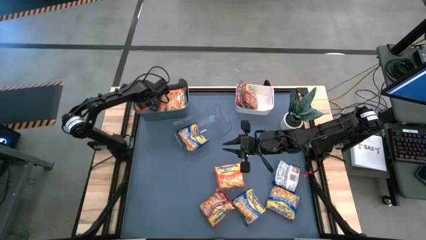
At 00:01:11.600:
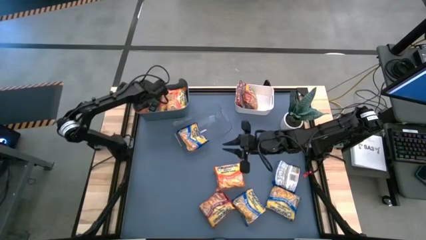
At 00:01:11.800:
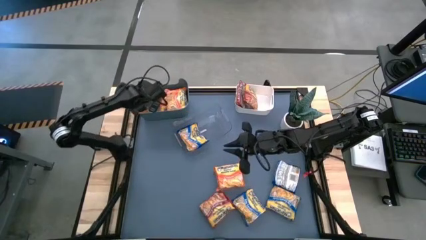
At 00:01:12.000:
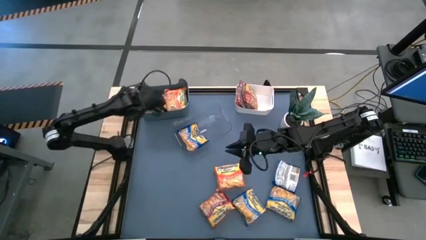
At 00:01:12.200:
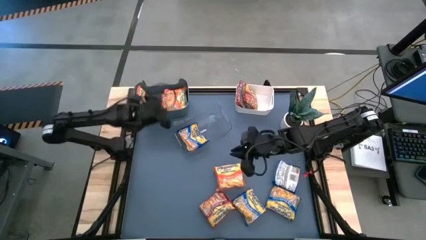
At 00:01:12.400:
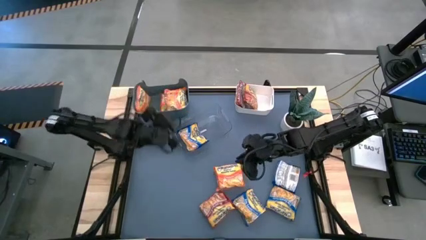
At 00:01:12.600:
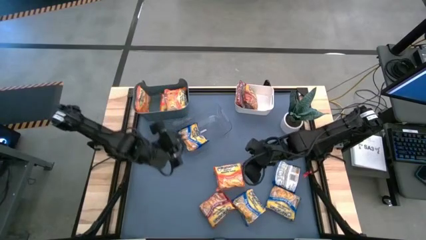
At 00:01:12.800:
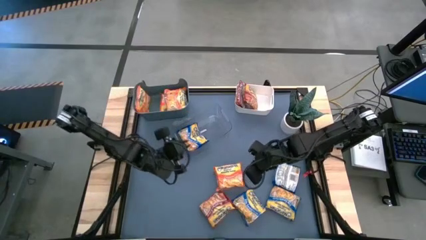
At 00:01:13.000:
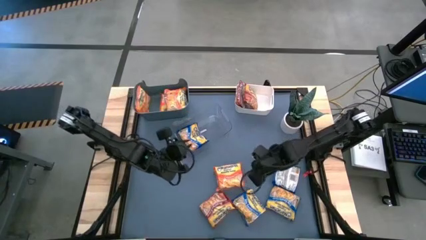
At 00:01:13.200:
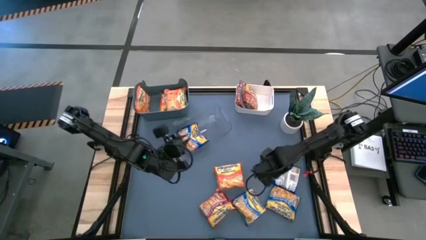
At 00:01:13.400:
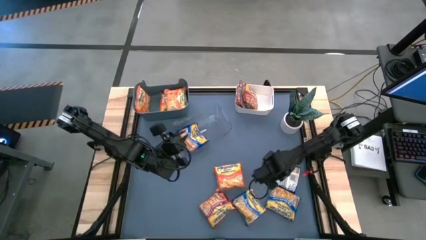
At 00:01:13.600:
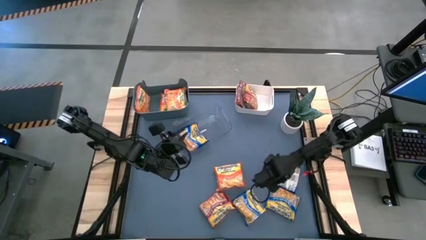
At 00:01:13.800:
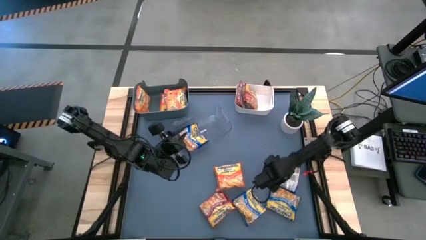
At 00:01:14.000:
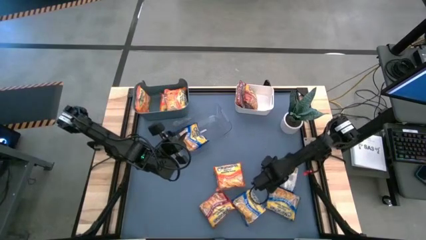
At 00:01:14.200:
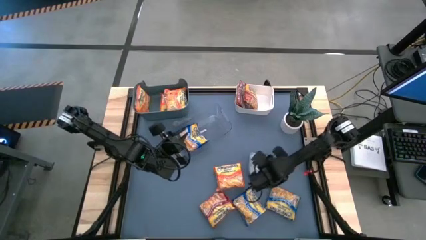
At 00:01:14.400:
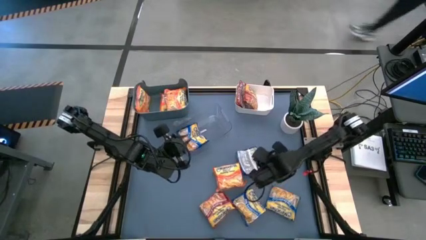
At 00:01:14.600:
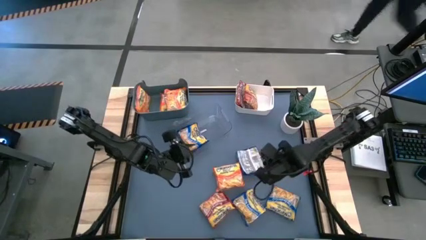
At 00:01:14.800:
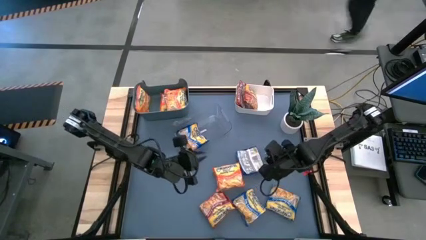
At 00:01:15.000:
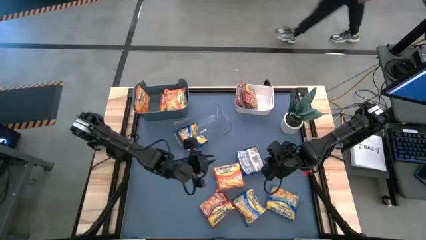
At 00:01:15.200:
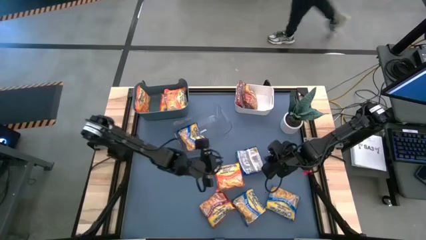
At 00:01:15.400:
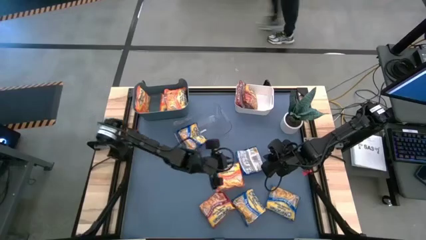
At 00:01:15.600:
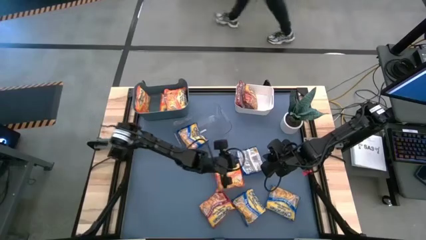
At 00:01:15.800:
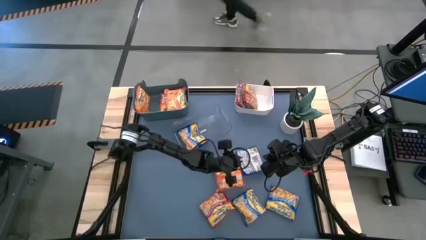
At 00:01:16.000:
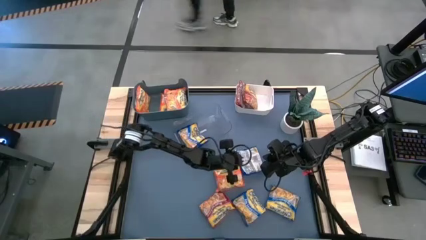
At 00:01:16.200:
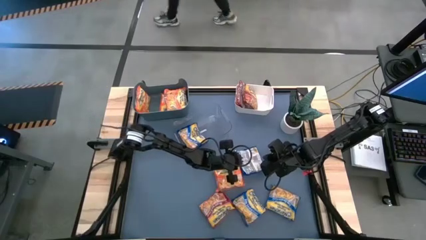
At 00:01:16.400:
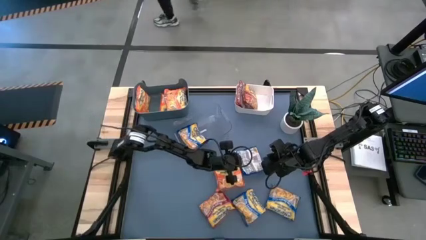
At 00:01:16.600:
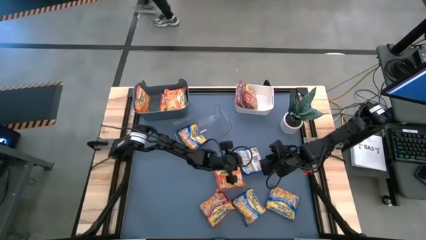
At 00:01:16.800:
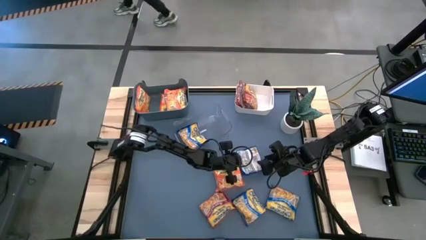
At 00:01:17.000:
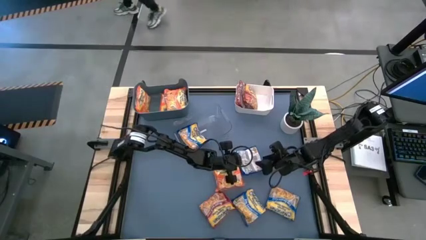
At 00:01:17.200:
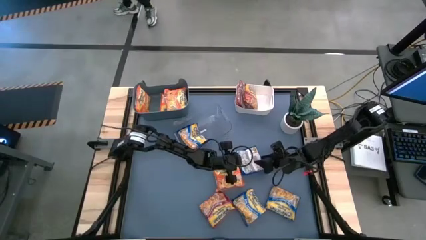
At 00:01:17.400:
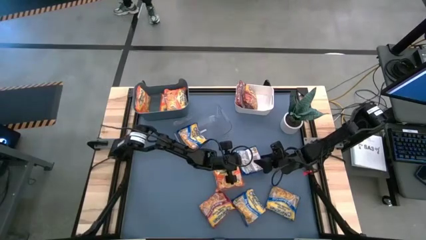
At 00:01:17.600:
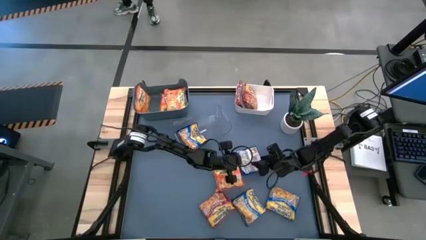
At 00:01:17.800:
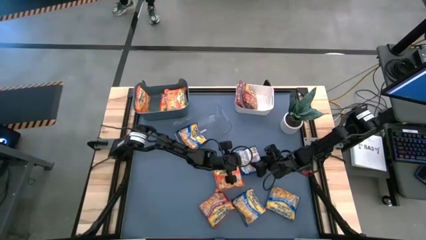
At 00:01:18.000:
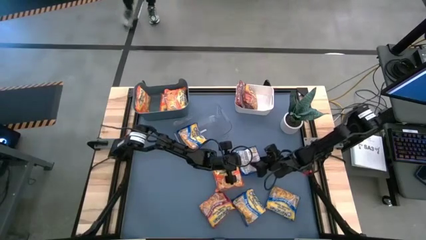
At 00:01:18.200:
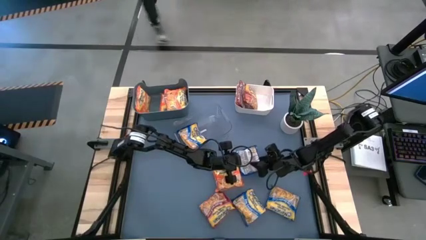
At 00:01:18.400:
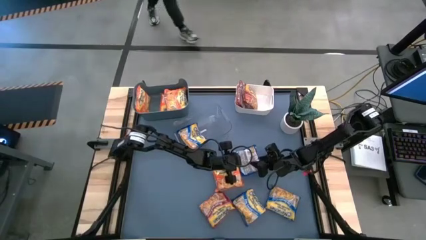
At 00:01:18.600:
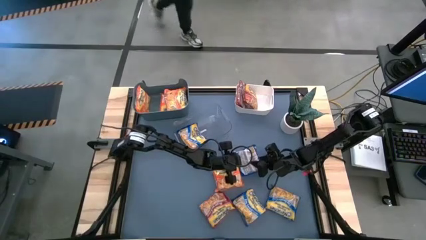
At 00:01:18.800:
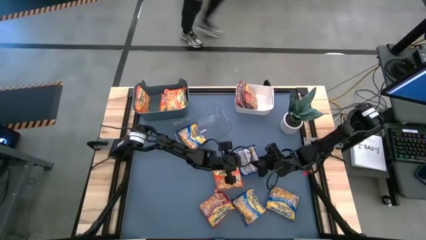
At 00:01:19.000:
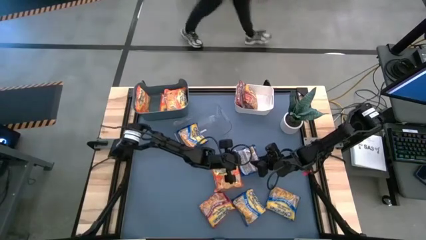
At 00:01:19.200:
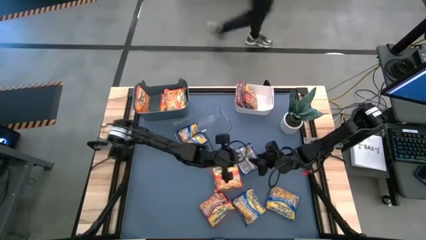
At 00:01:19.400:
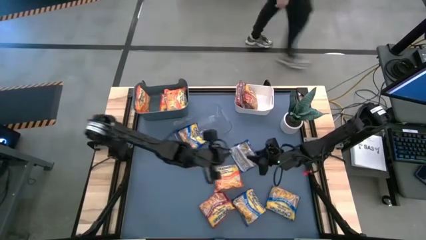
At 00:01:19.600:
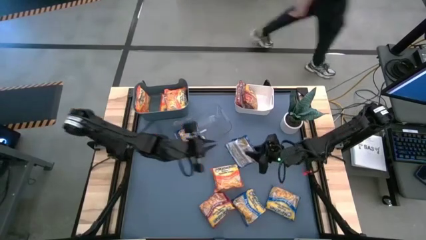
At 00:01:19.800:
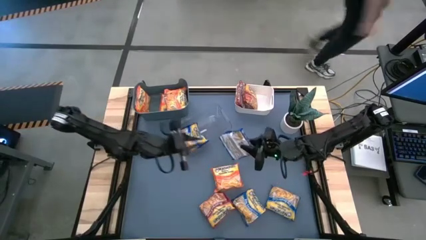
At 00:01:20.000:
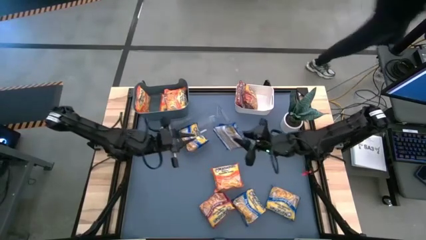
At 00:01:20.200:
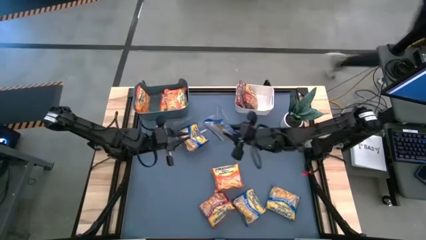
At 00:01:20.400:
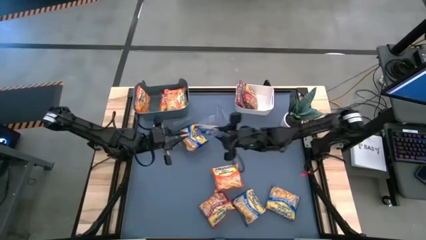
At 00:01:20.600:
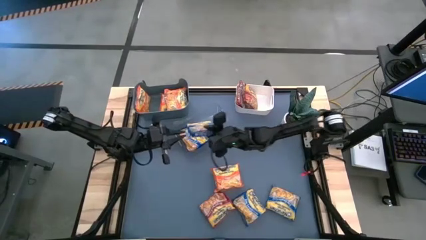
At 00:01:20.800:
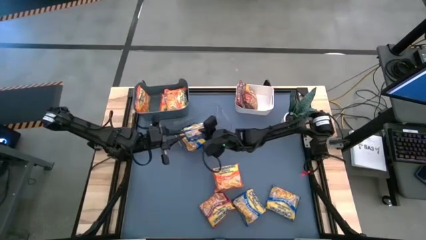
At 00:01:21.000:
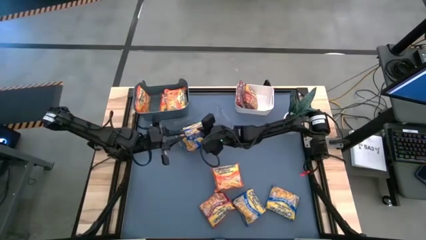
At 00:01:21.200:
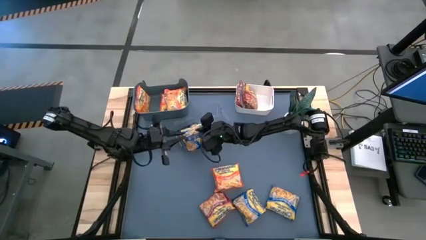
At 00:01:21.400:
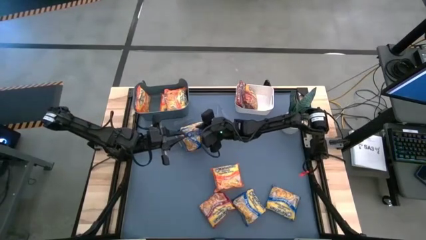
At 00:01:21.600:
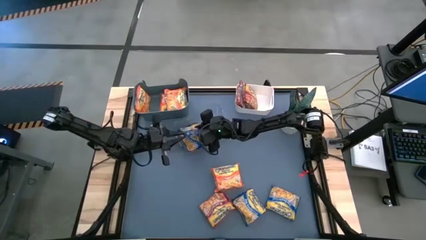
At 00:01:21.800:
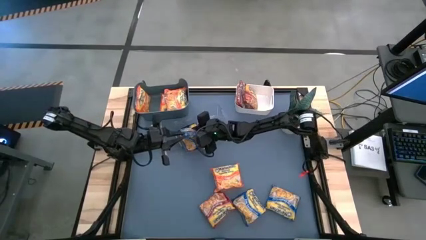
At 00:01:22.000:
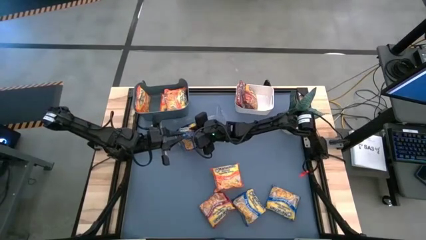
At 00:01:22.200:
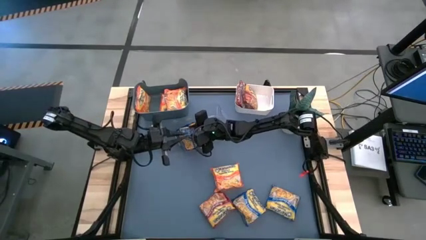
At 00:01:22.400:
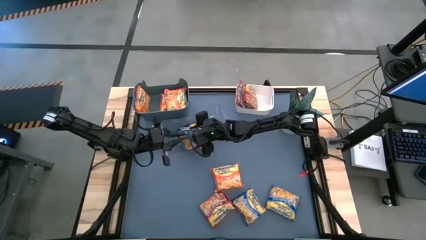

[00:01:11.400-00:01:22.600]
Task: Sort Maruchan noodles
Put the blue noodle pack into the transparent bin

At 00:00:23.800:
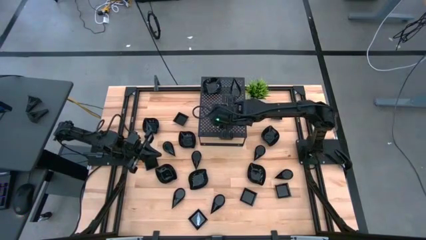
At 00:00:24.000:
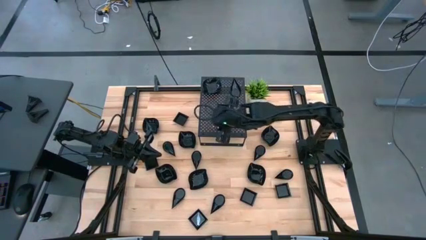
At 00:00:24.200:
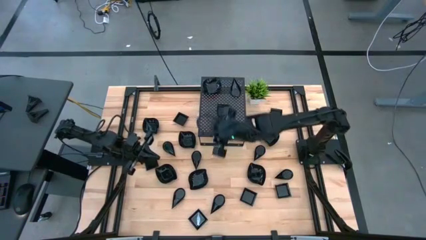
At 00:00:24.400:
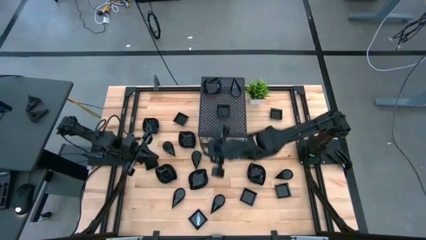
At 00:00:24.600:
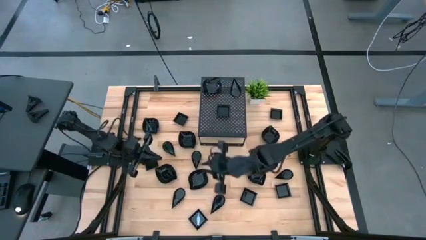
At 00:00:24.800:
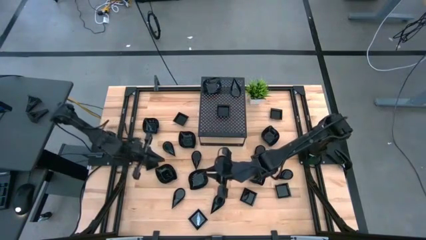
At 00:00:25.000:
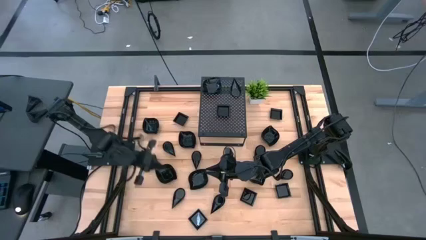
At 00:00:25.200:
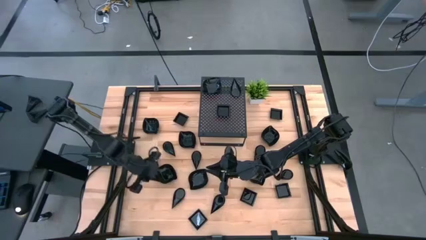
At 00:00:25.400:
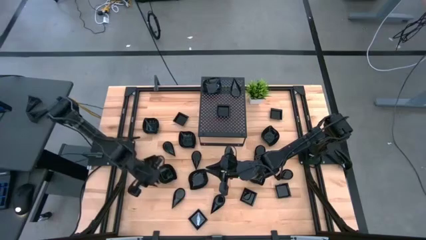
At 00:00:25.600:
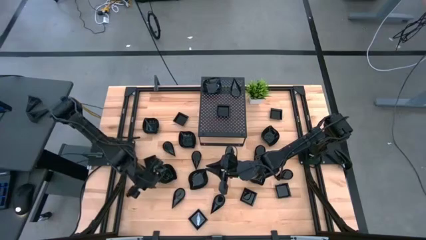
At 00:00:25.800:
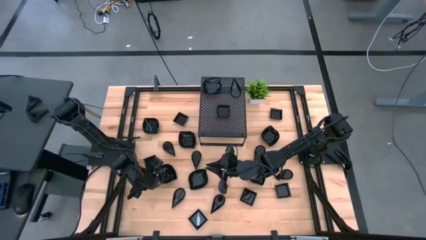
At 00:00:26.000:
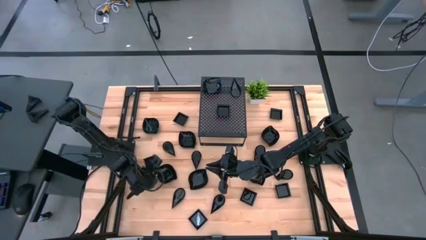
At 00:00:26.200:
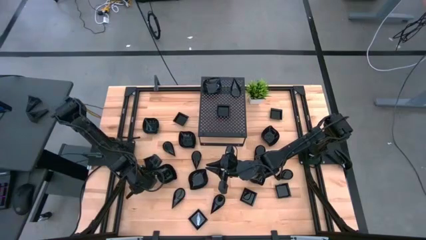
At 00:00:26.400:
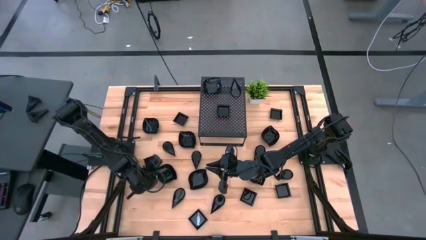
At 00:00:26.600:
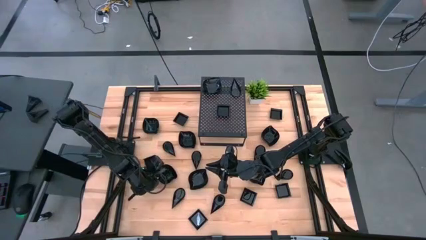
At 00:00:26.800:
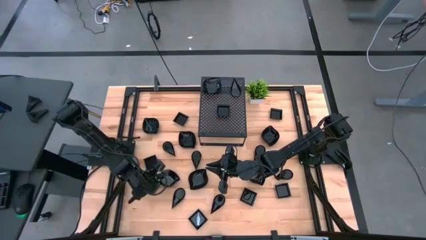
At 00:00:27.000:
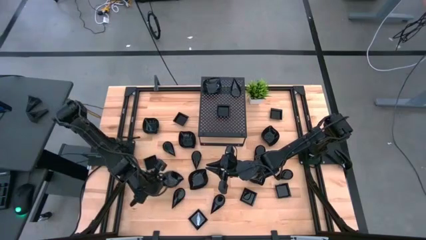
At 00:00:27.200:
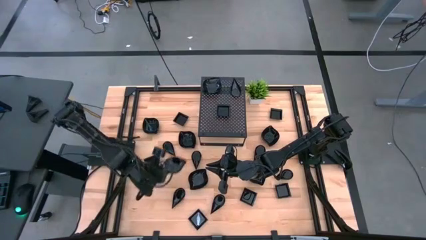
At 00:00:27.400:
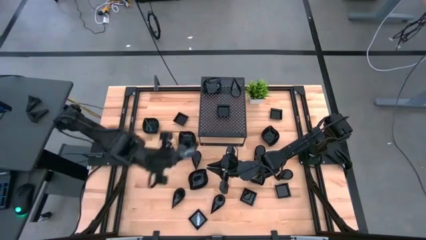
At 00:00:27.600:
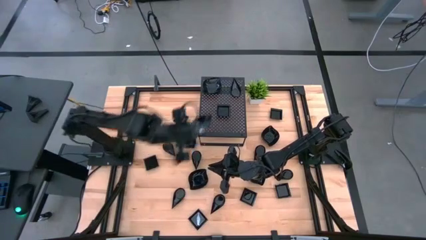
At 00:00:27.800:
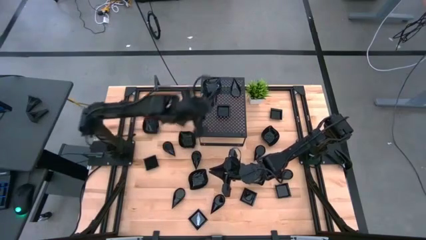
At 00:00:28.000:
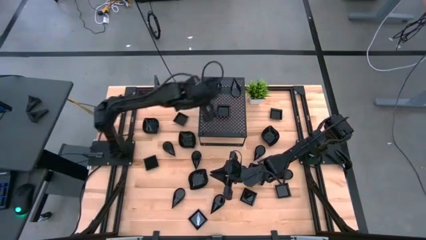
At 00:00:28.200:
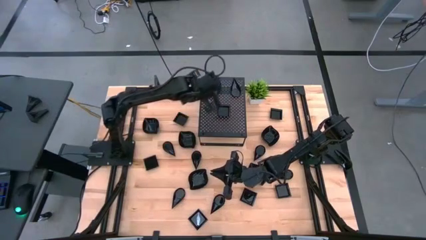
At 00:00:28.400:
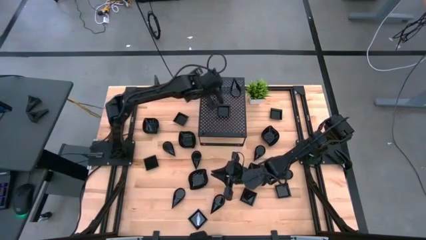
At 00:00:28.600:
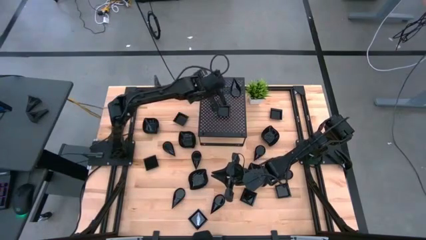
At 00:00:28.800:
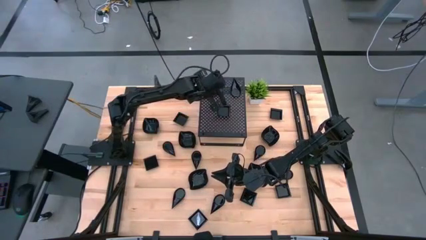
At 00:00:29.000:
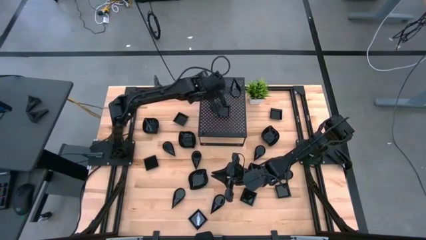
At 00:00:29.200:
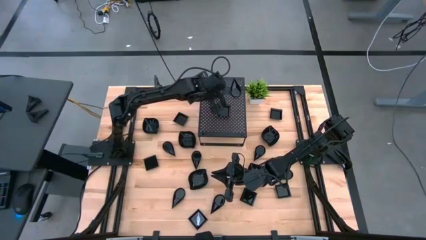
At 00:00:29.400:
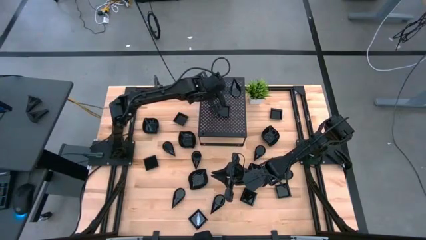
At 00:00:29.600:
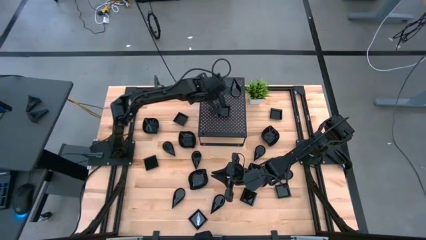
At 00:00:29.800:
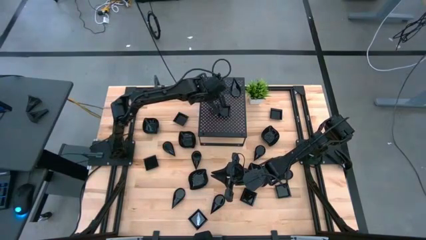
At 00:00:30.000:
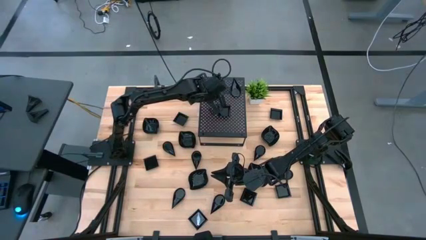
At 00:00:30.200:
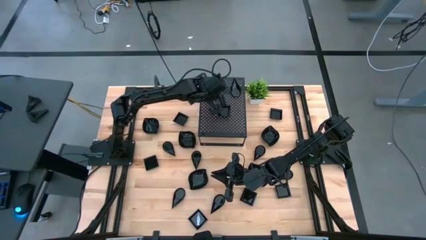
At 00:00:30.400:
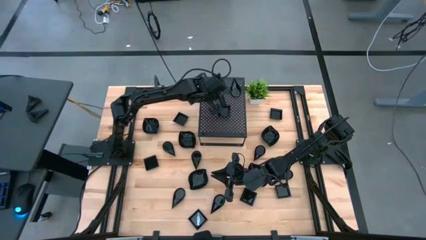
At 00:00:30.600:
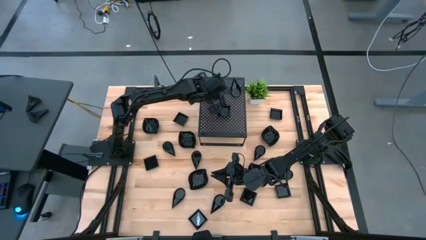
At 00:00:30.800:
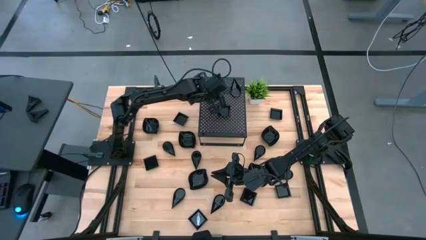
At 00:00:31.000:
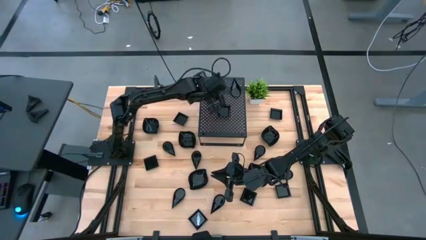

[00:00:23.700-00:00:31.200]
Task: Pick & Place Mini shaped plates
Stack the black leaf-shaped plate on top of the black leaf-shaped plate on the shelf
